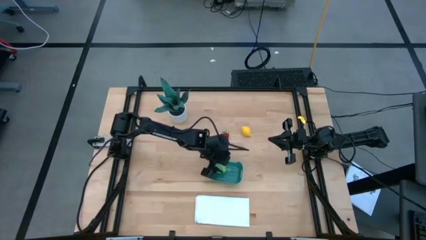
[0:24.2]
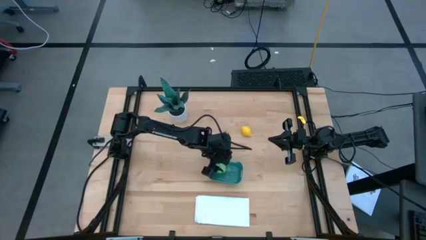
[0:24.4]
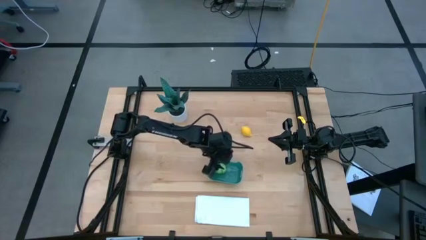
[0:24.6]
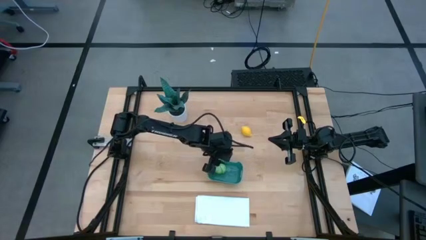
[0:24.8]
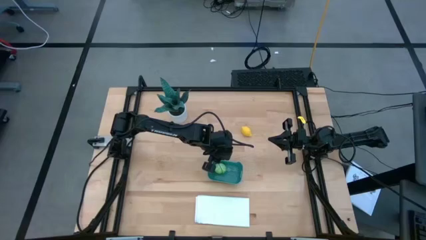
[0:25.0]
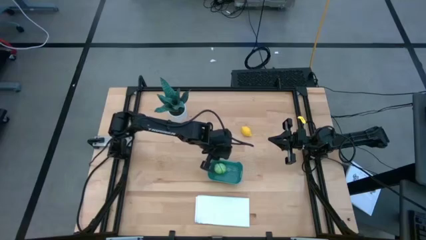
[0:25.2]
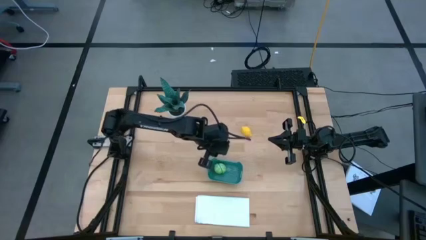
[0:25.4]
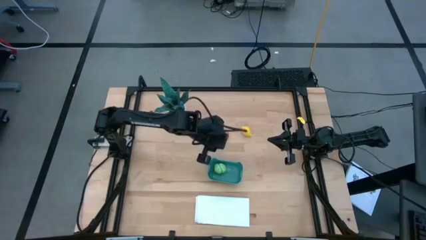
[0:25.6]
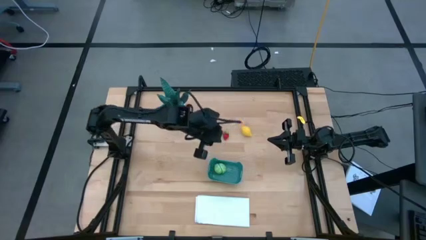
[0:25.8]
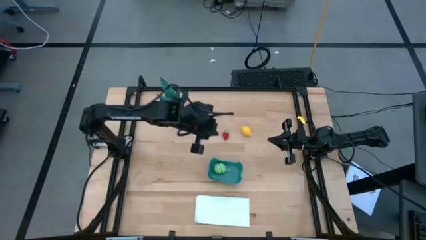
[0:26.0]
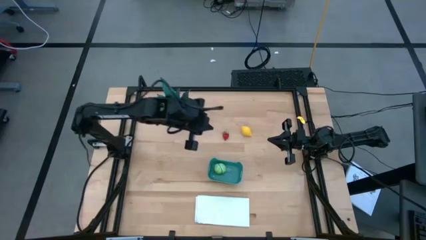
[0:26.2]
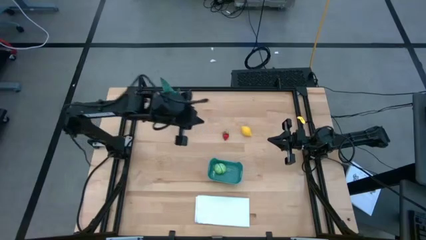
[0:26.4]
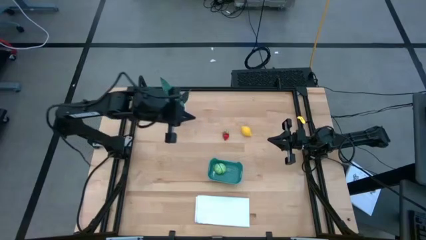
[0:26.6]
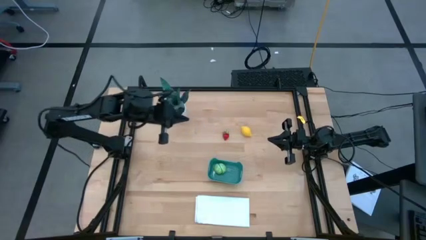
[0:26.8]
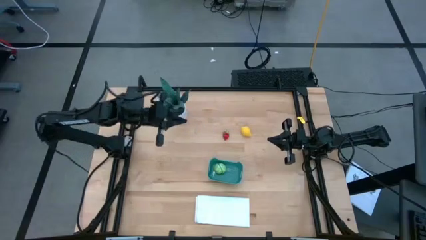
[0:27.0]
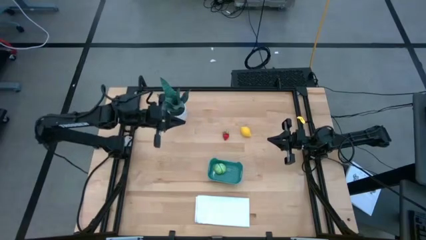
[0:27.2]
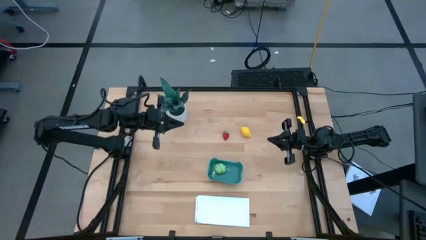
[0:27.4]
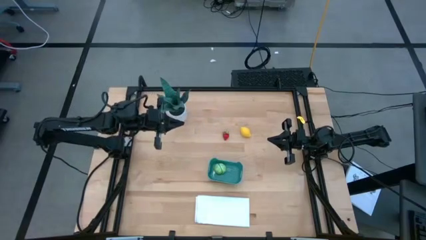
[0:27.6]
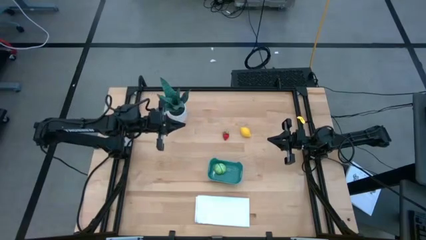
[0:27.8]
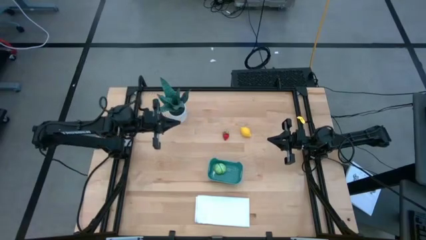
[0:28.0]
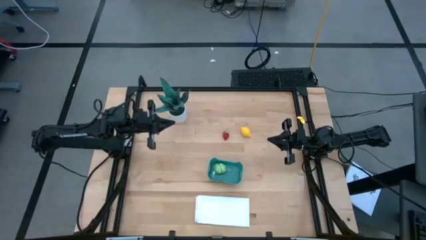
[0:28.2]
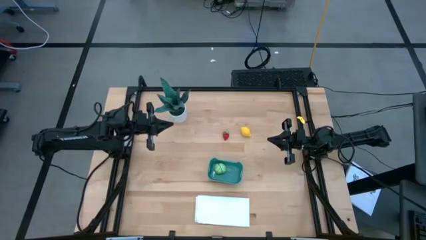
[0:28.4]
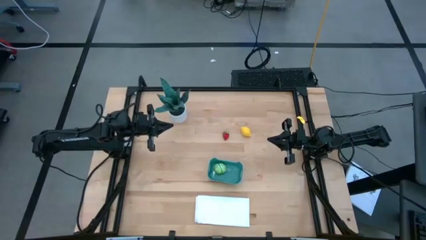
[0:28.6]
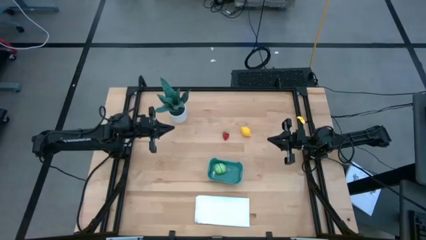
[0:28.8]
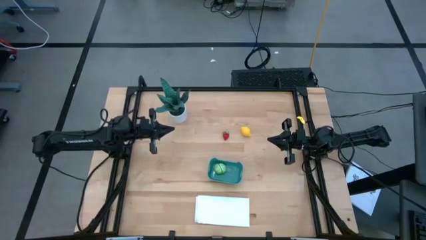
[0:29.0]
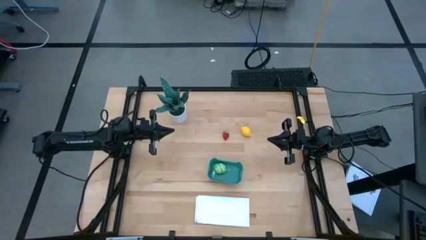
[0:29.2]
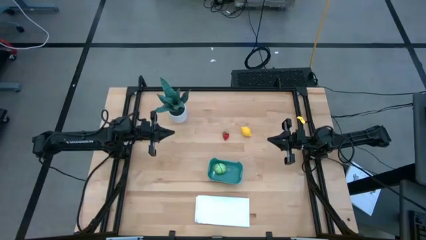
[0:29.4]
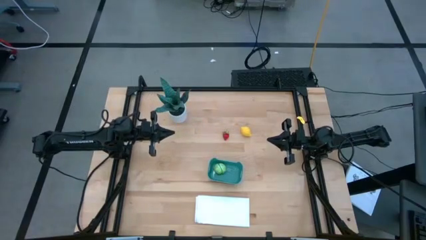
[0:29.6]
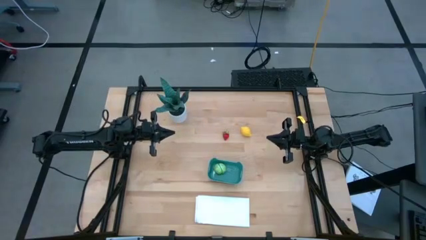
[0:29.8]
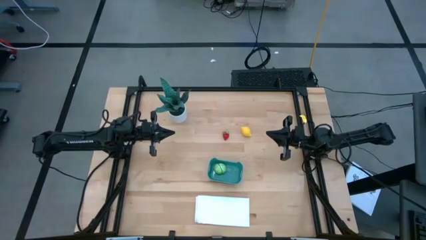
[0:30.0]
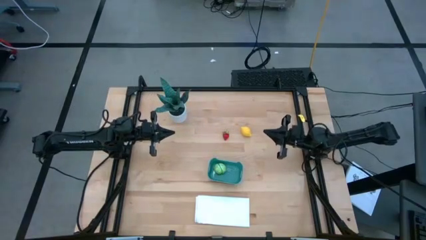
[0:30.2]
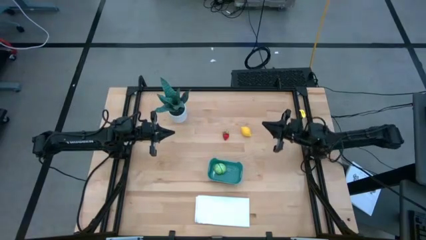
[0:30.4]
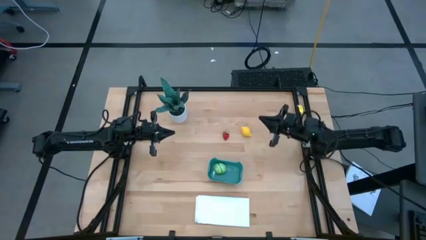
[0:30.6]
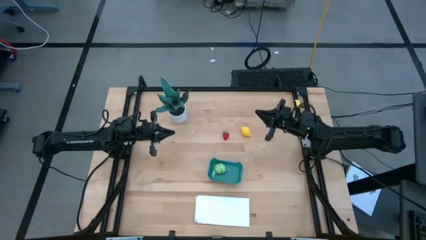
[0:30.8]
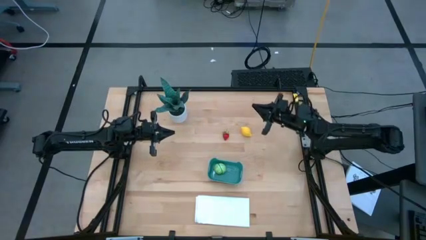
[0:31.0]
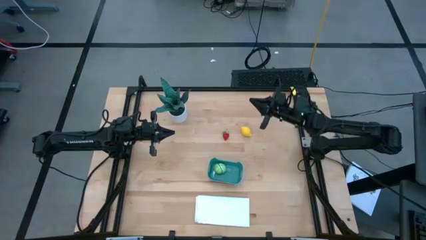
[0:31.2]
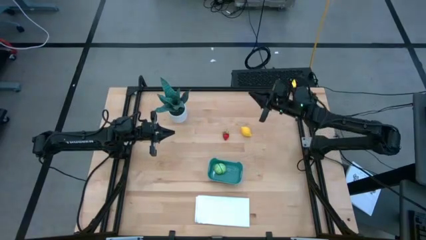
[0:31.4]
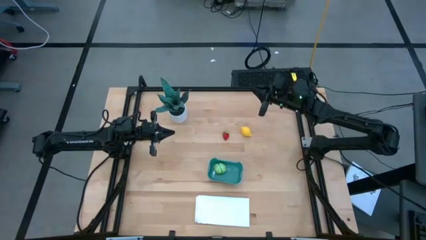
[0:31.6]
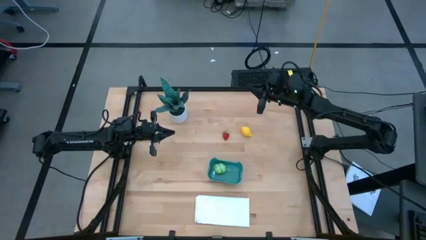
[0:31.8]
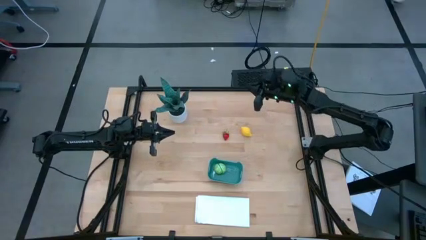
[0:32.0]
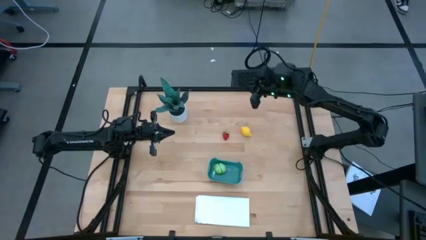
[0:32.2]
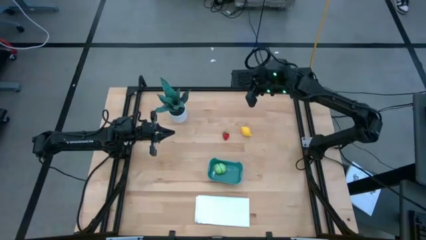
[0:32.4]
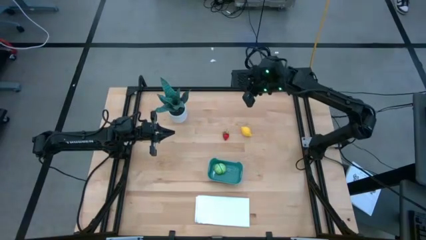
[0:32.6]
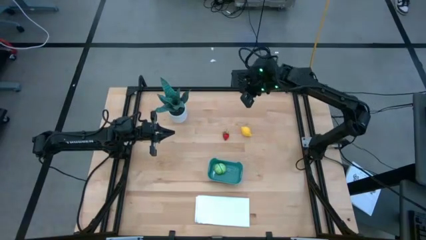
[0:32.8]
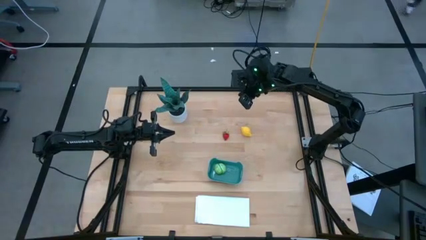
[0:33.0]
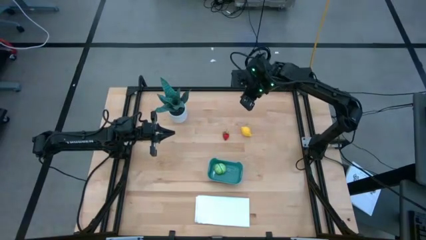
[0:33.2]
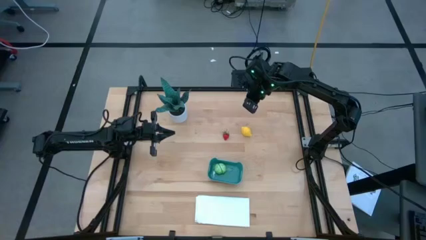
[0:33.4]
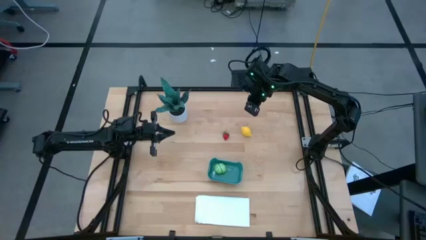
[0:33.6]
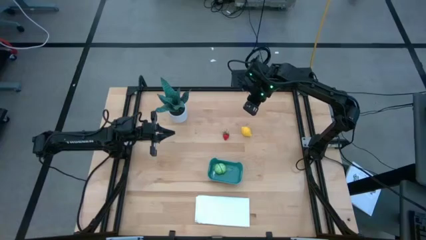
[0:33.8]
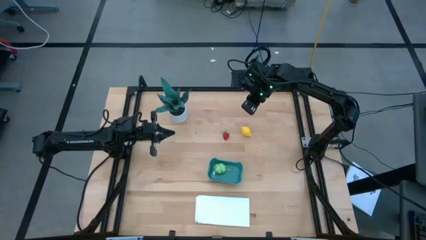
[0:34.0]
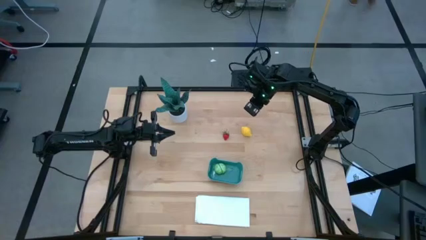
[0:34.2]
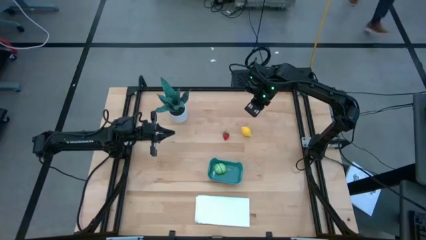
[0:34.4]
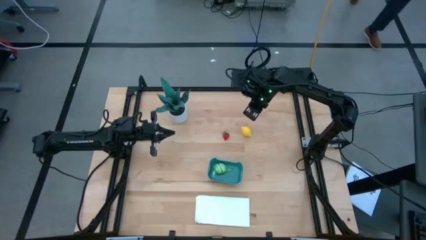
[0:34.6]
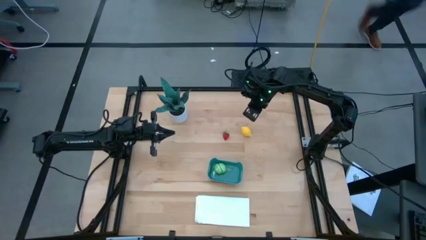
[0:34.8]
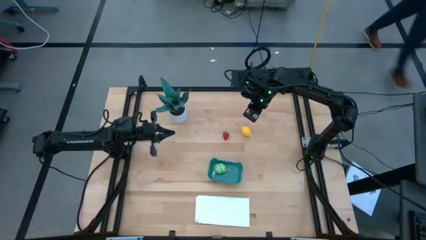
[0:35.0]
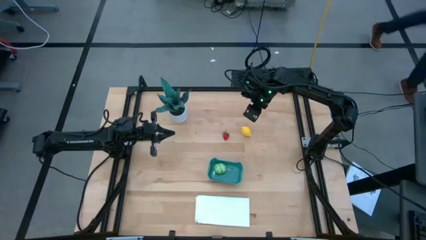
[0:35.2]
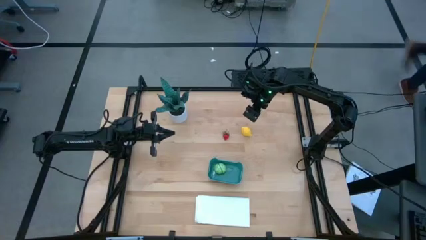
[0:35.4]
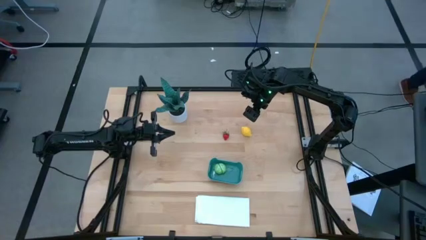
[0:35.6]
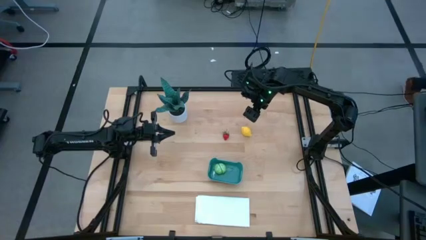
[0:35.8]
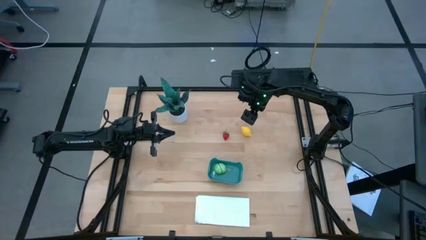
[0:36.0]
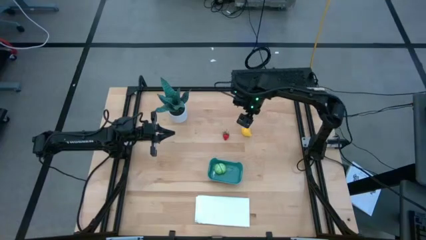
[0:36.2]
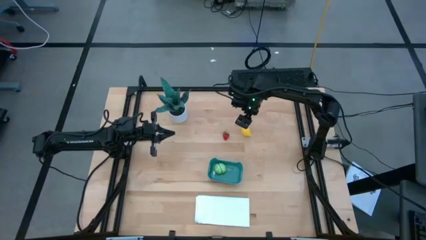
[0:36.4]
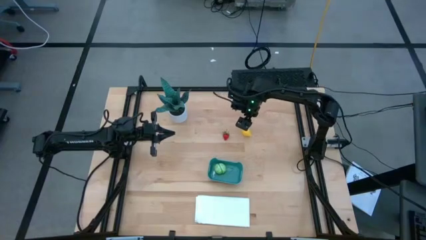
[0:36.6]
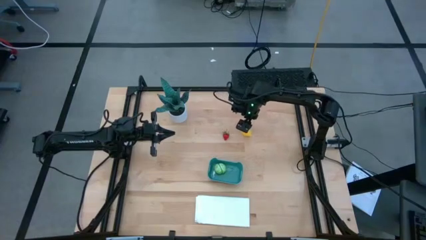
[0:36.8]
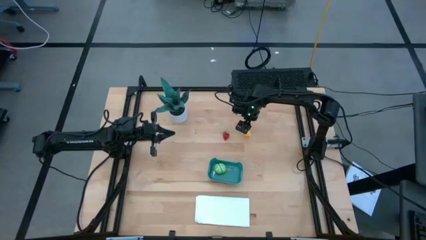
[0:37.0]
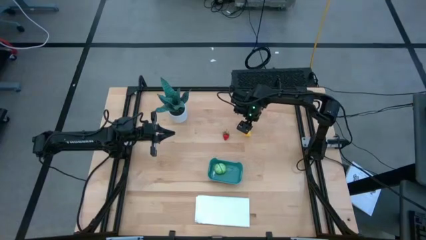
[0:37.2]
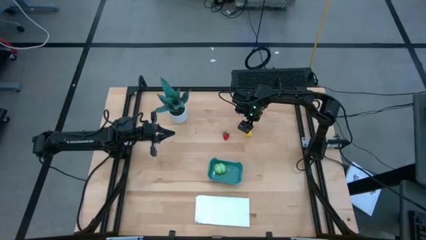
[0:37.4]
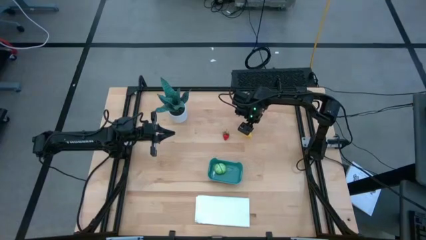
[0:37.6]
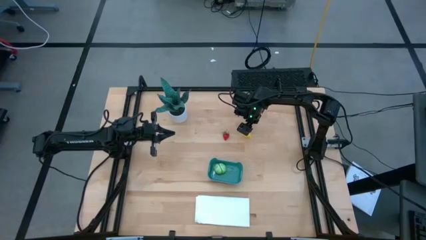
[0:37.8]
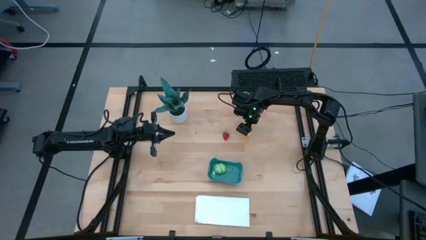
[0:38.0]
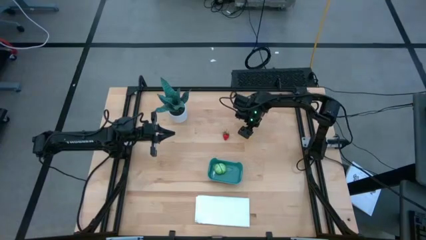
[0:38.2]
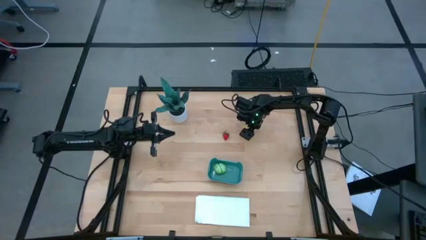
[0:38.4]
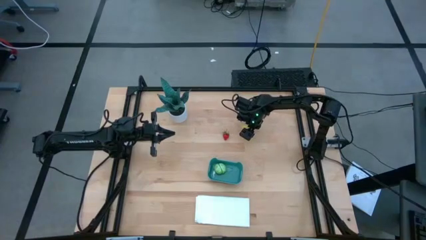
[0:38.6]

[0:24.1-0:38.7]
Task: Pick and placing Produce into tupperware
Put the lemon into the bin
